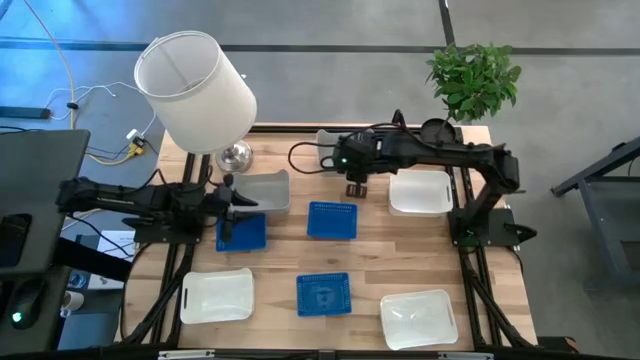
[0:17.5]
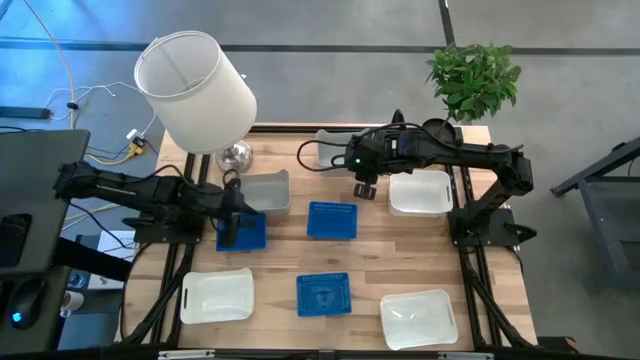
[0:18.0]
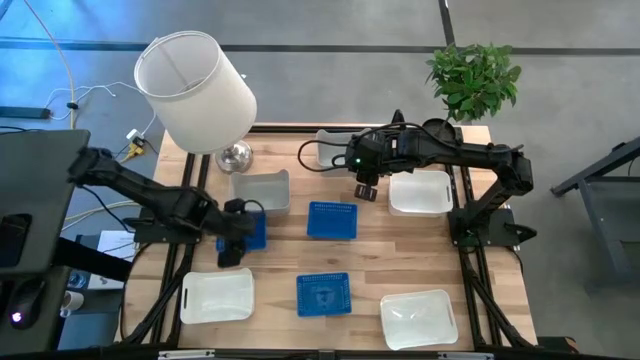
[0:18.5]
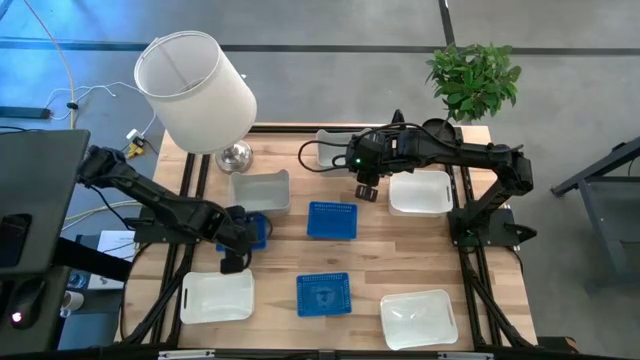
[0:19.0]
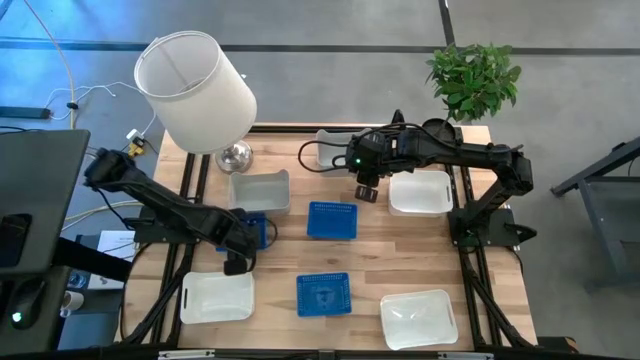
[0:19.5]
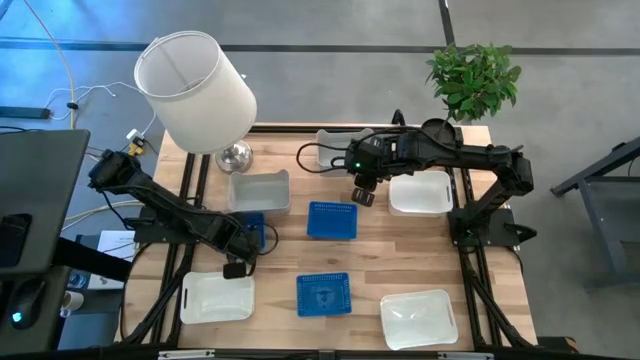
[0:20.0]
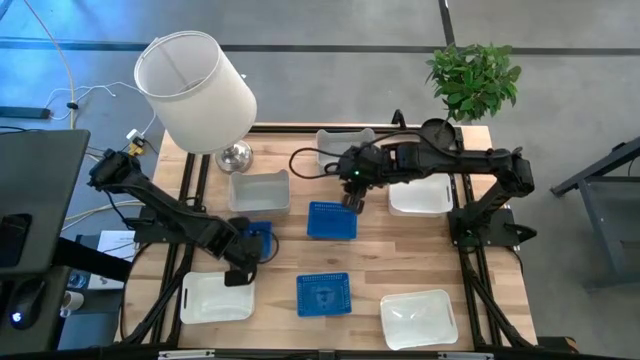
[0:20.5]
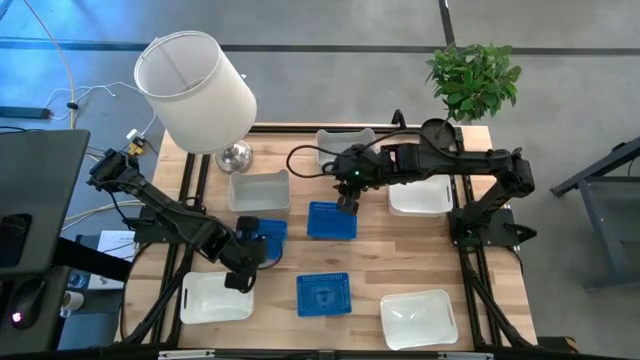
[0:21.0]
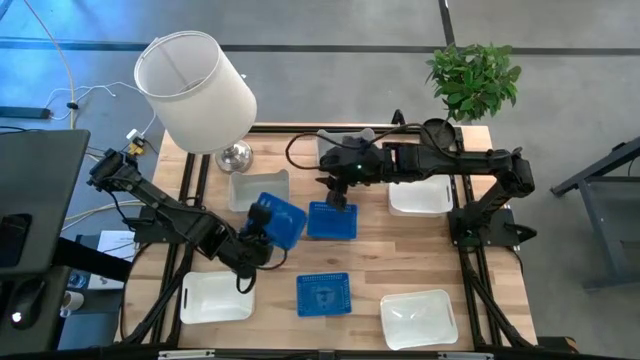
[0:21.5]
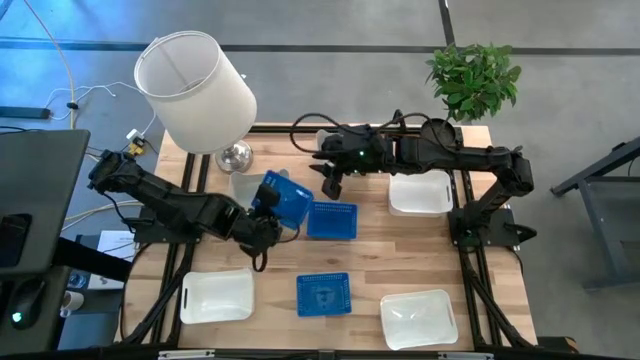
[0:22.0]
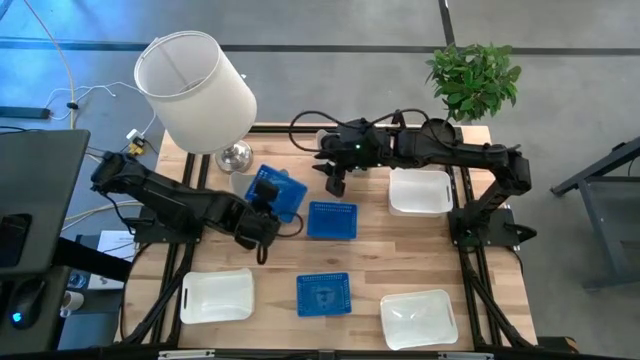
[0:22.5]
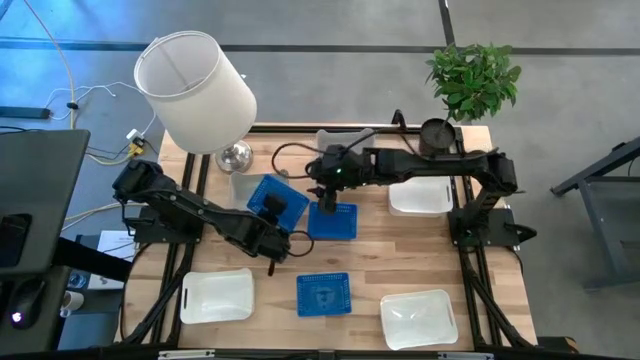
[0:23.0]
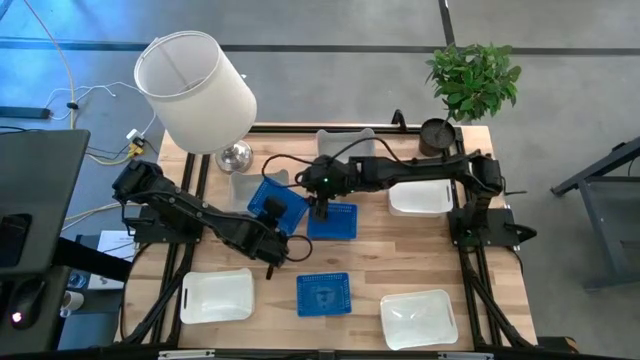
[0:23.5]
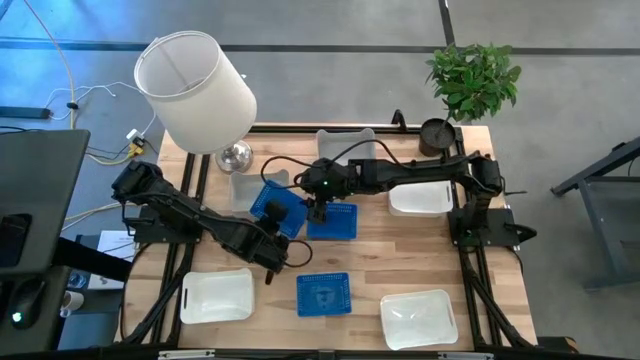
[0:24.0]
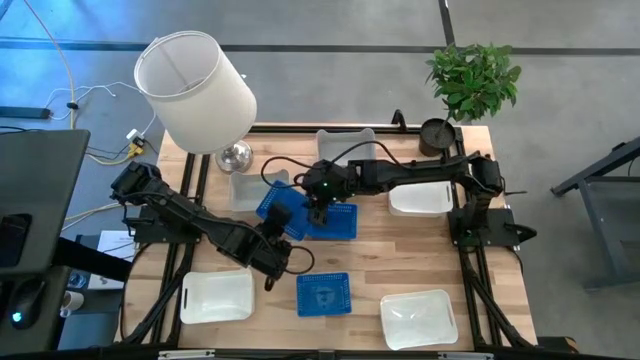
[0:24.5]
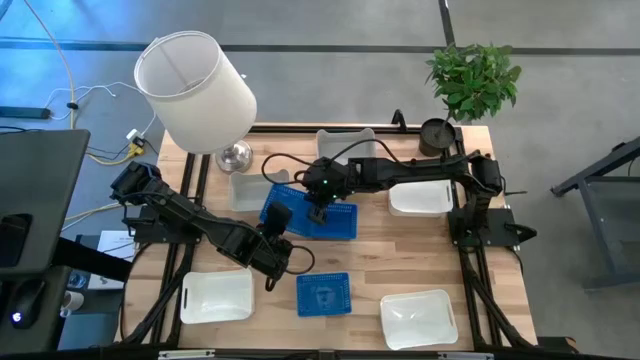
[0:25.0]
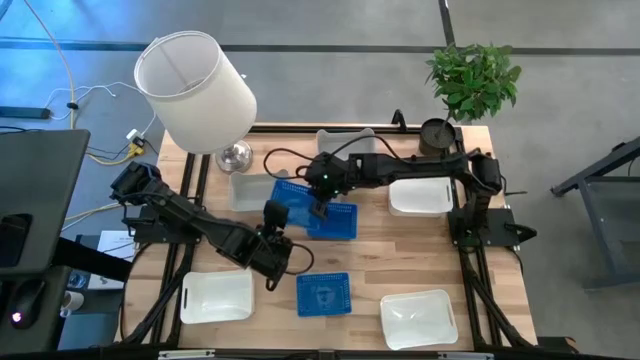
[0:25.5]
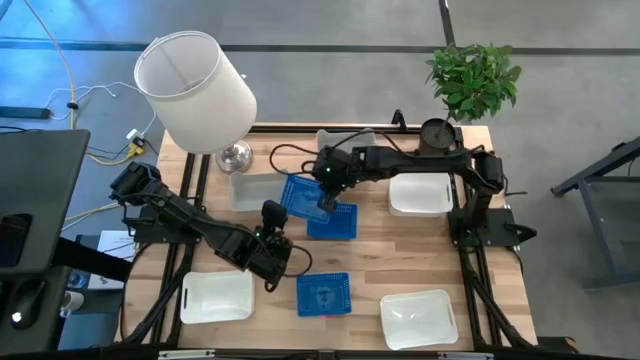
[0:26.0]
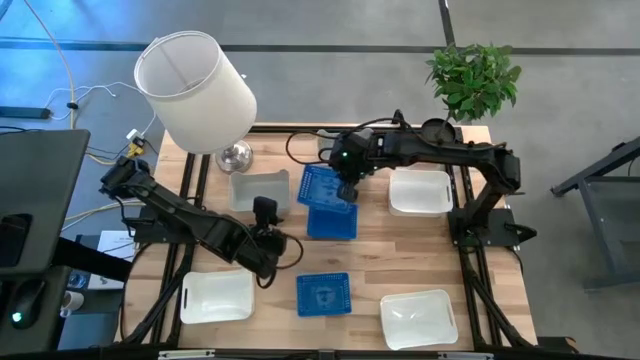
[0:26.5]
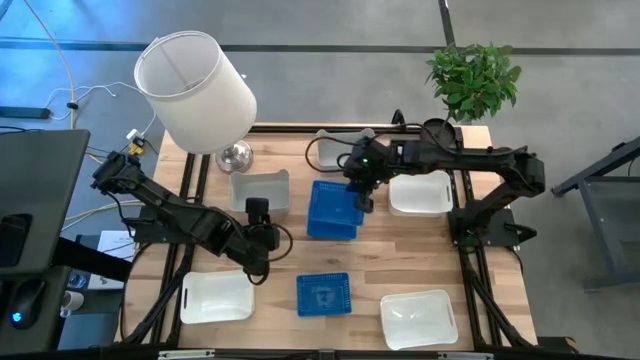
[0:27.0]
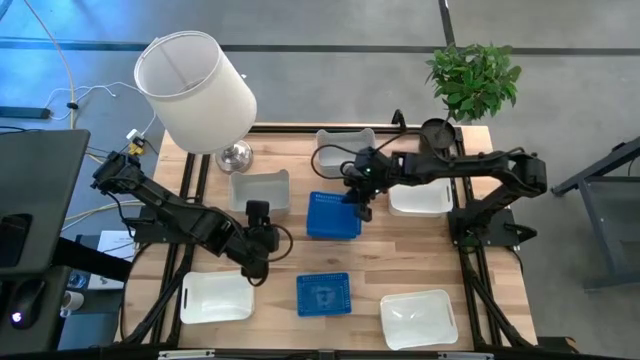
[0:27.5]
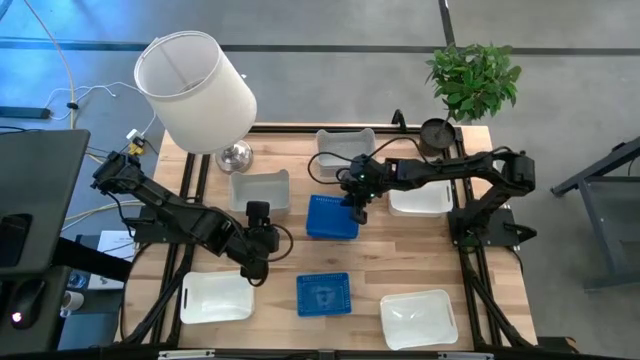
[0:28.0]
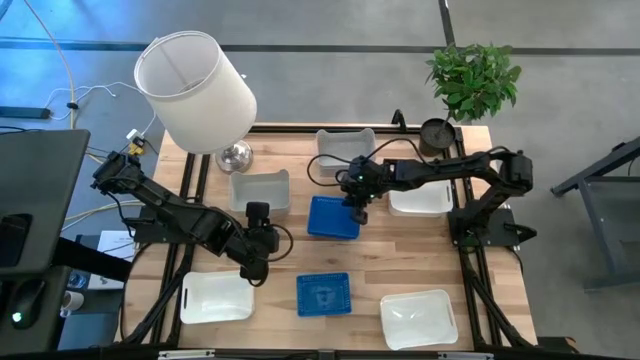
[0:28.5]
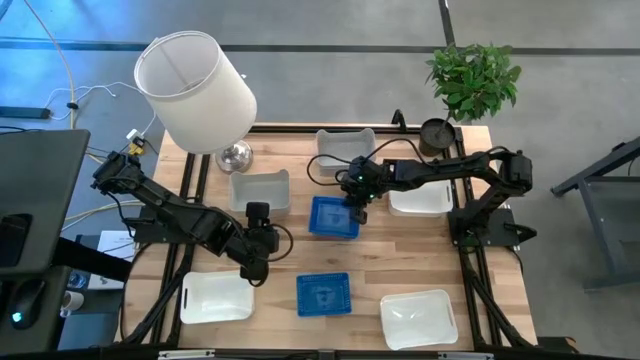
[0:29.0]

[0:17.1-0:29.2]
Stack the left blue bin on top of the right blue bin

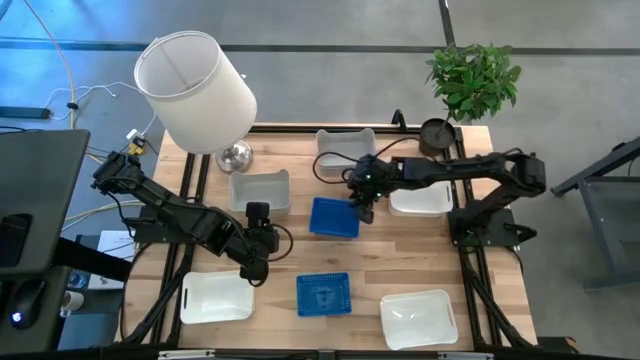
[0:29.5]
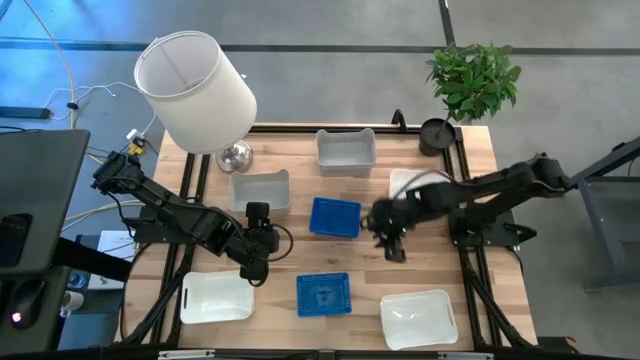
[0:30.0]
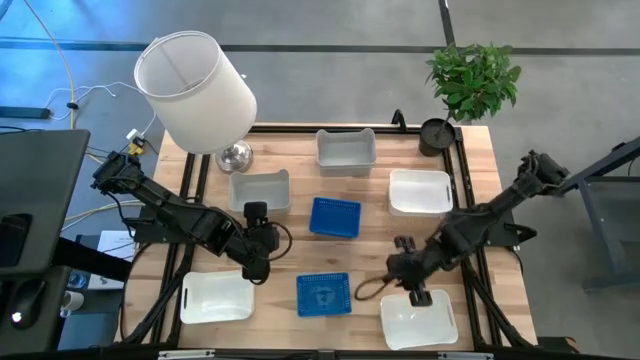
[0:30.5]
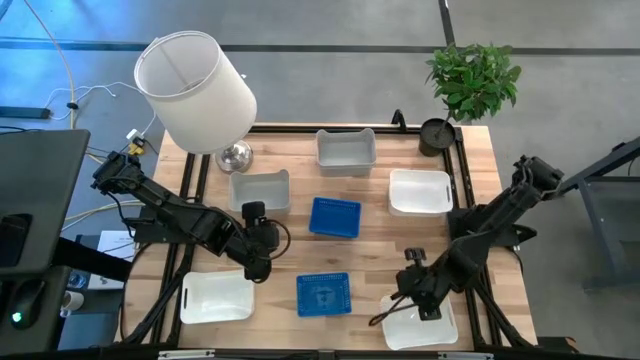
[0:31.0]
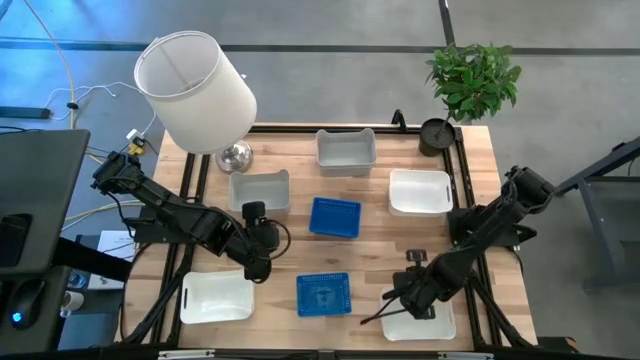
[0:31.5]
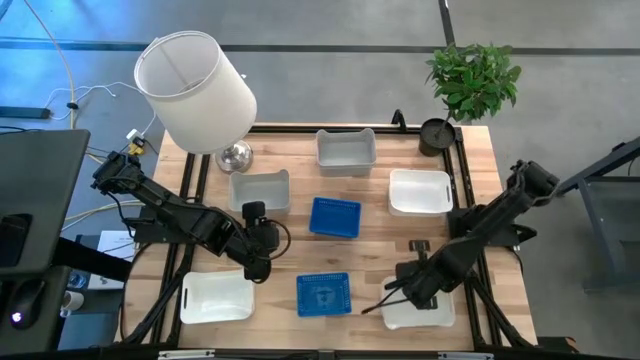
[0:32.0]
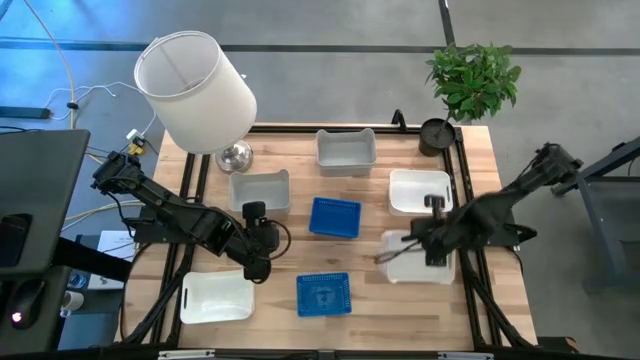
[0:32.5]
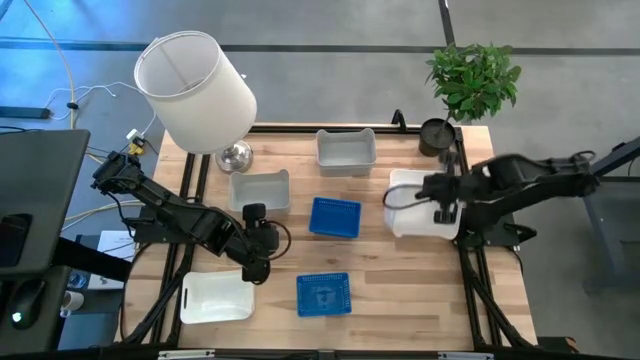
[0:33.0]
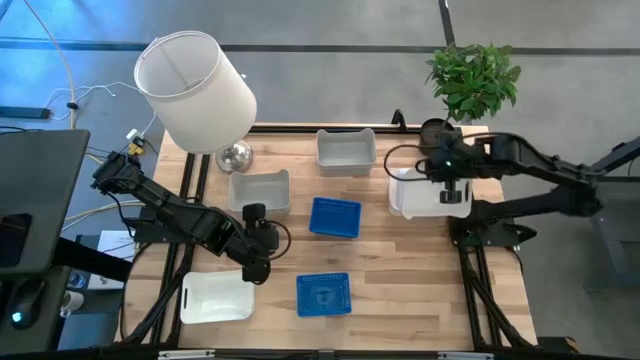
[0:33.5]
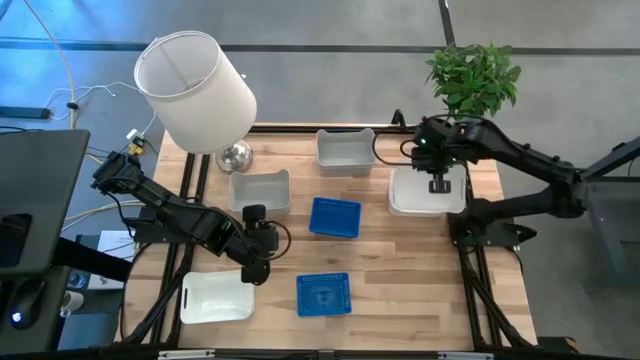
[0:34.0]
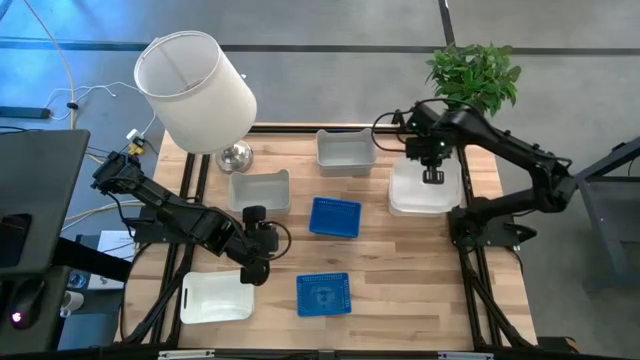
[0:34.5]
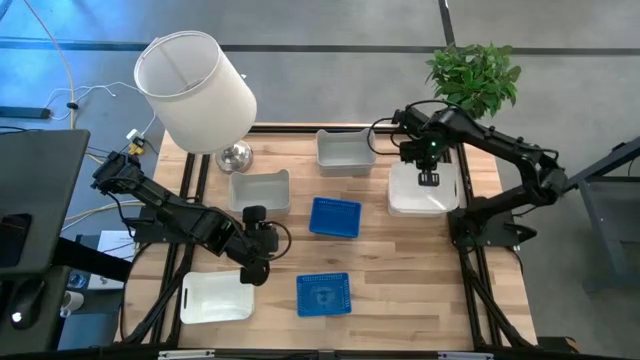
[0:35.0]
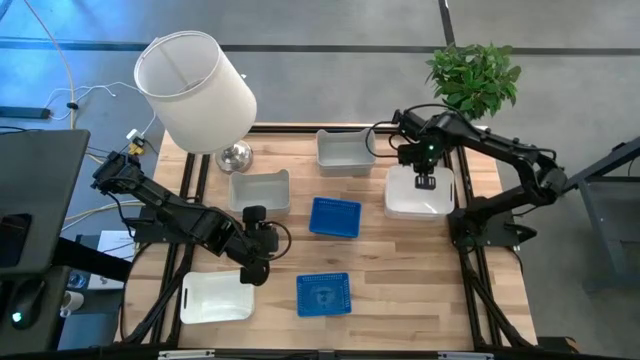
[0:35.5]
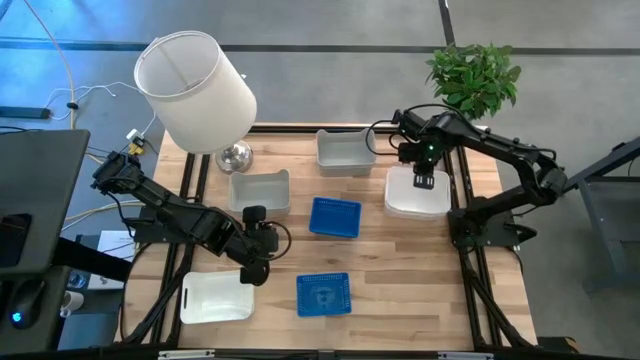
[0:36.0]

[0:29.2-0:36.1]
Stack the right white bin on top of the top white bin
